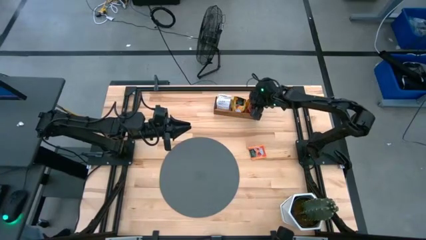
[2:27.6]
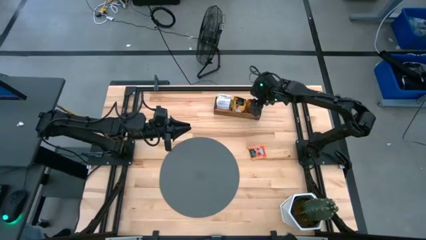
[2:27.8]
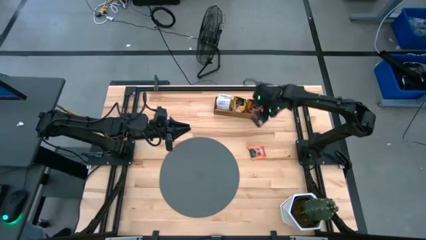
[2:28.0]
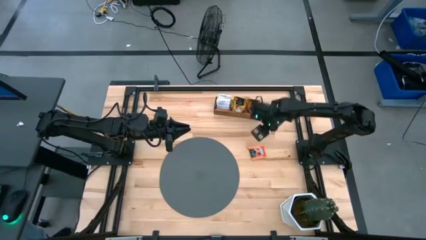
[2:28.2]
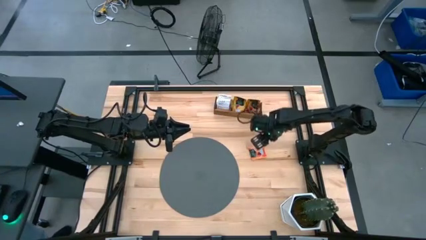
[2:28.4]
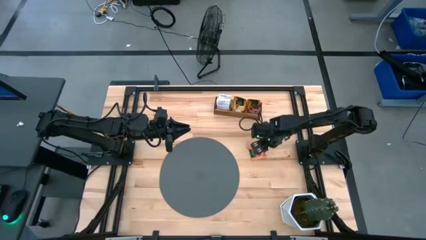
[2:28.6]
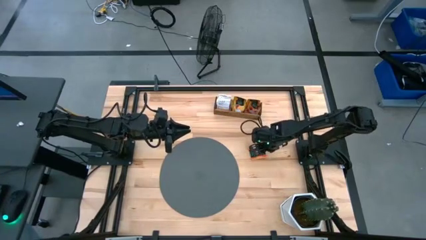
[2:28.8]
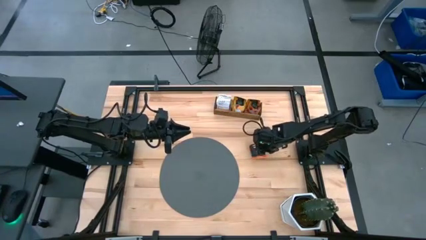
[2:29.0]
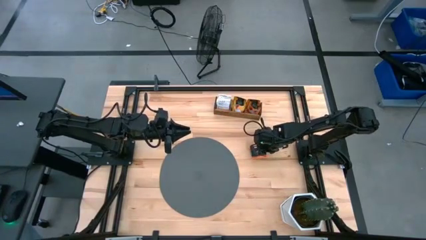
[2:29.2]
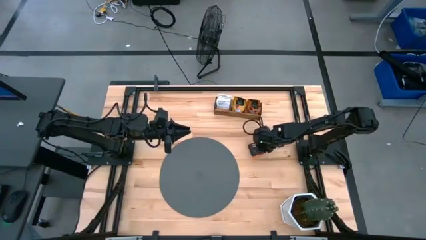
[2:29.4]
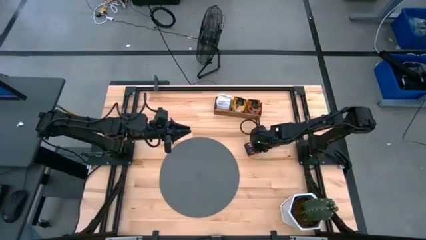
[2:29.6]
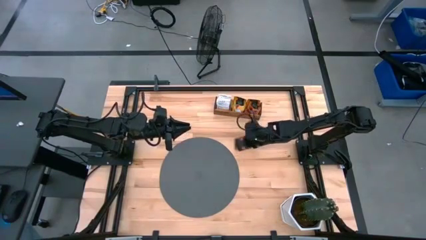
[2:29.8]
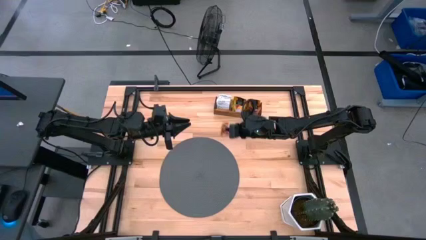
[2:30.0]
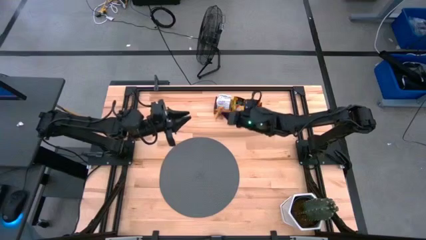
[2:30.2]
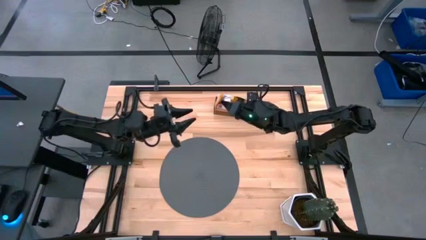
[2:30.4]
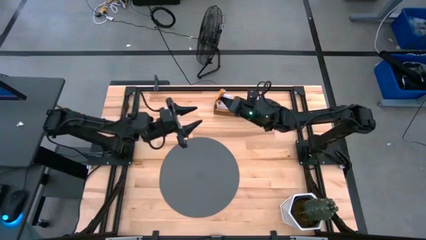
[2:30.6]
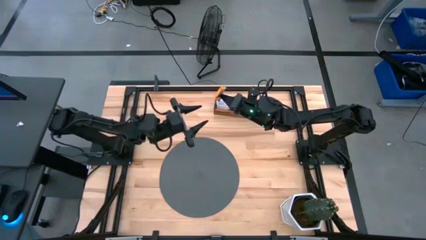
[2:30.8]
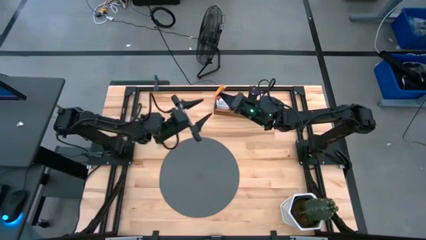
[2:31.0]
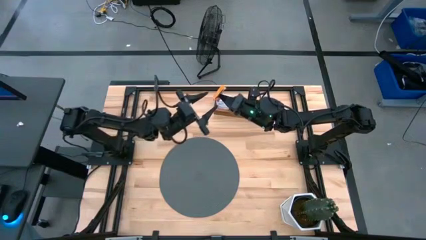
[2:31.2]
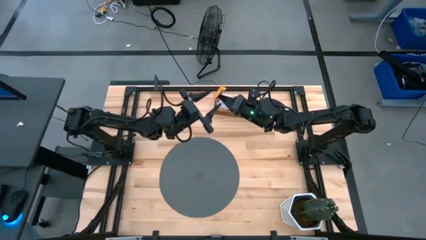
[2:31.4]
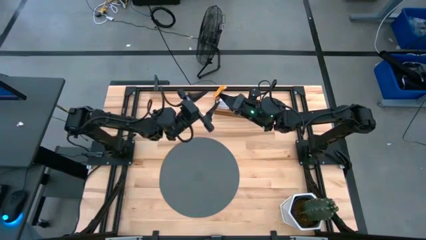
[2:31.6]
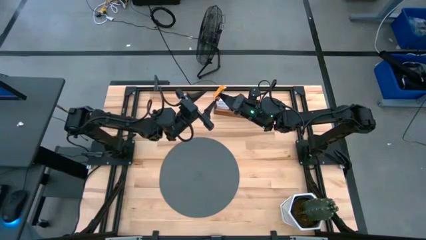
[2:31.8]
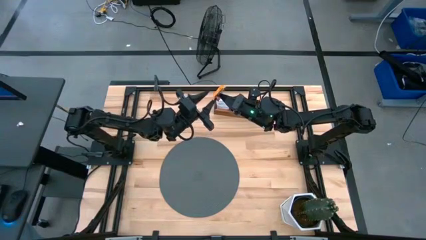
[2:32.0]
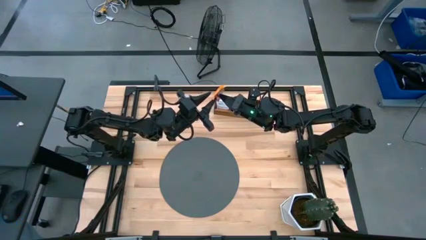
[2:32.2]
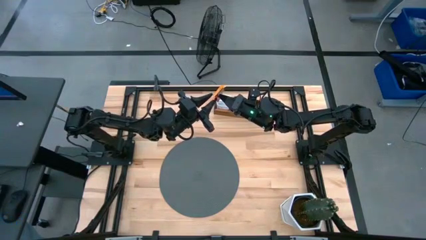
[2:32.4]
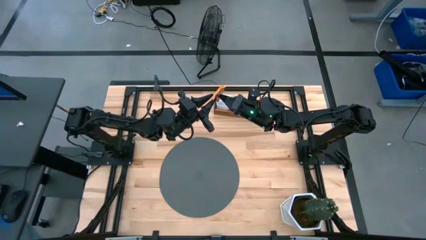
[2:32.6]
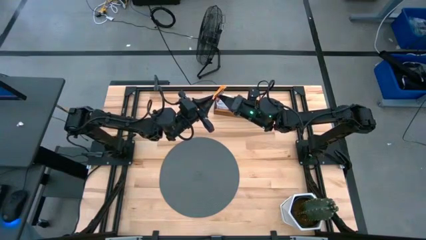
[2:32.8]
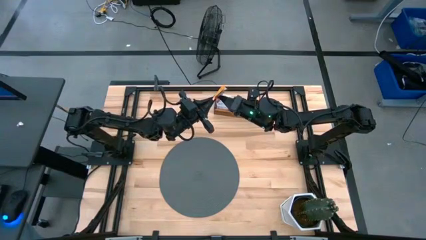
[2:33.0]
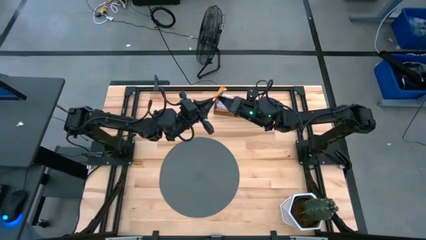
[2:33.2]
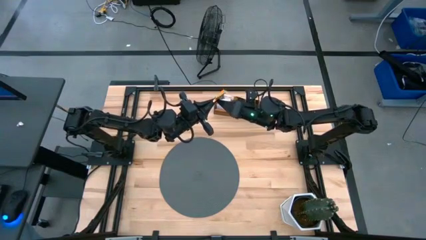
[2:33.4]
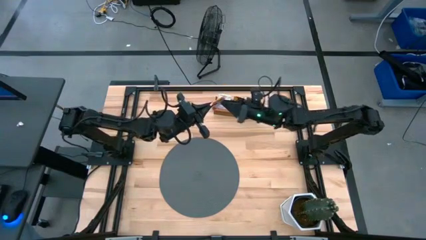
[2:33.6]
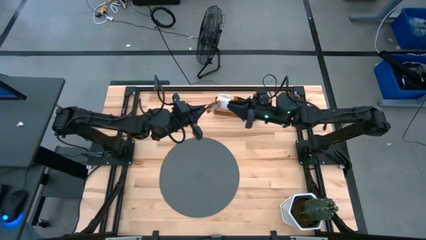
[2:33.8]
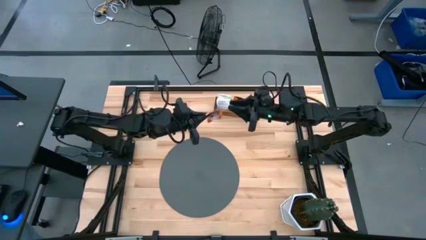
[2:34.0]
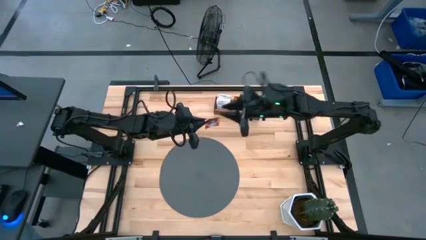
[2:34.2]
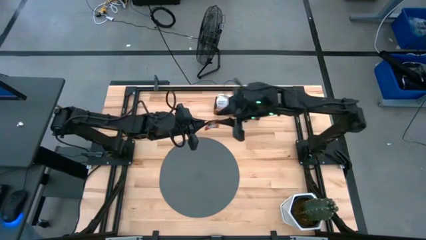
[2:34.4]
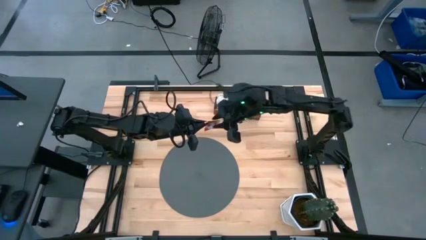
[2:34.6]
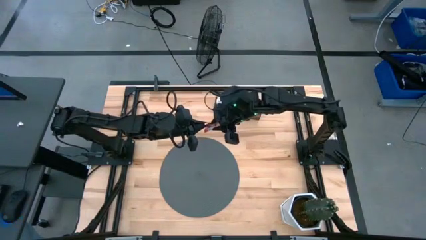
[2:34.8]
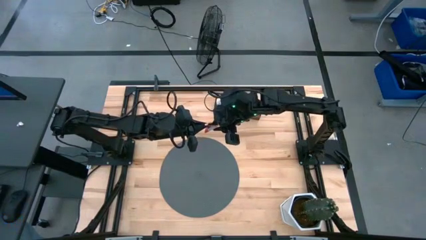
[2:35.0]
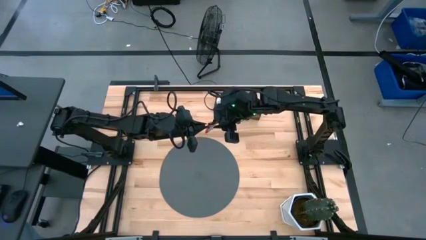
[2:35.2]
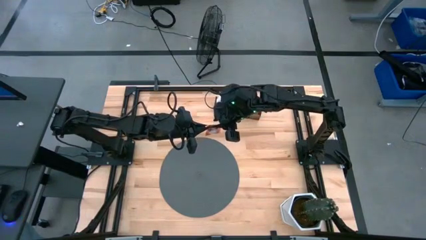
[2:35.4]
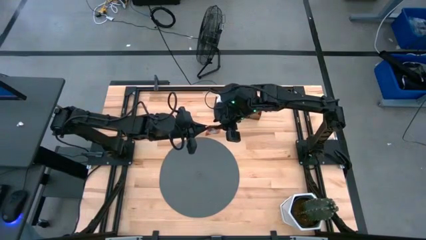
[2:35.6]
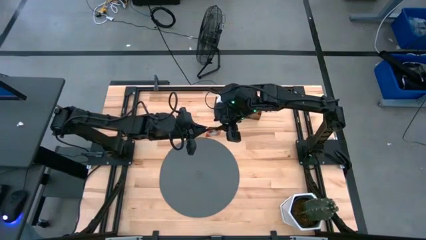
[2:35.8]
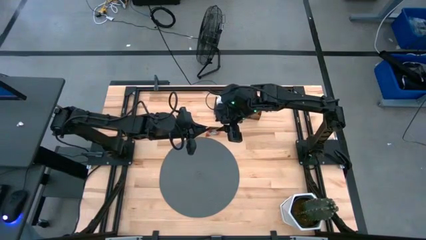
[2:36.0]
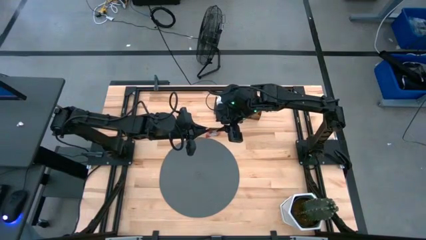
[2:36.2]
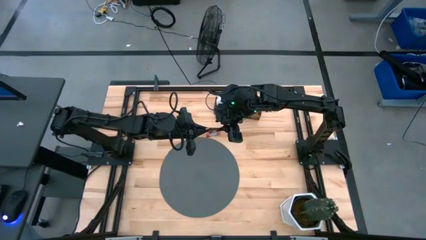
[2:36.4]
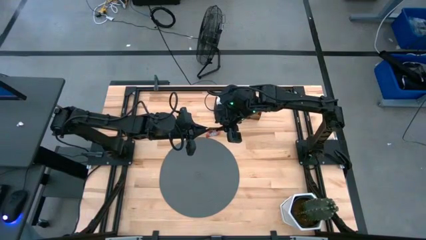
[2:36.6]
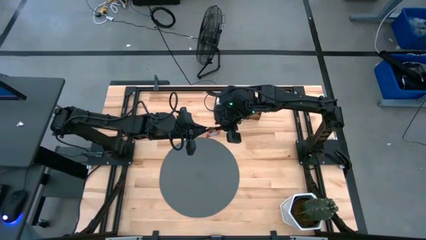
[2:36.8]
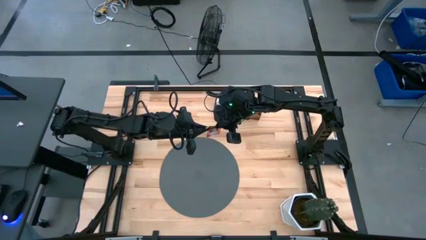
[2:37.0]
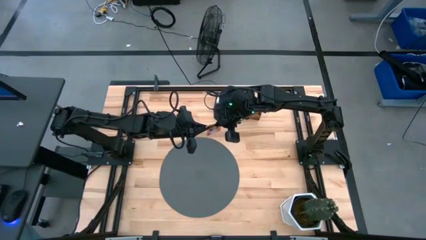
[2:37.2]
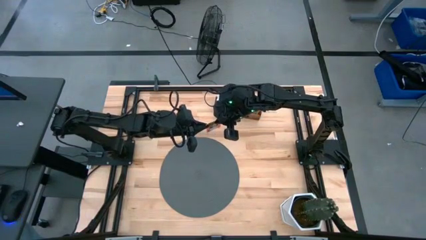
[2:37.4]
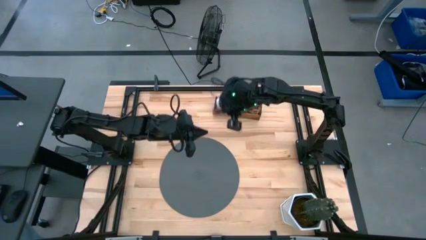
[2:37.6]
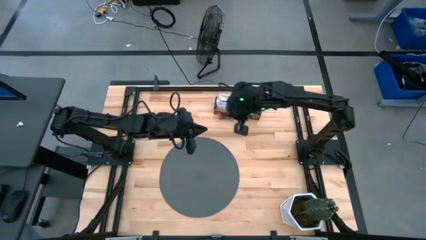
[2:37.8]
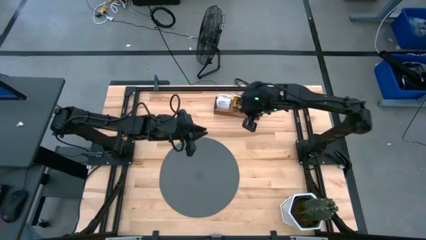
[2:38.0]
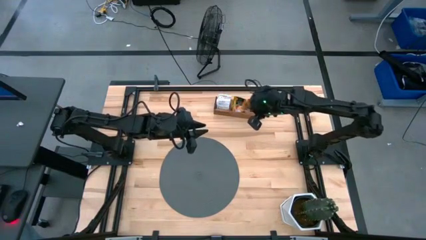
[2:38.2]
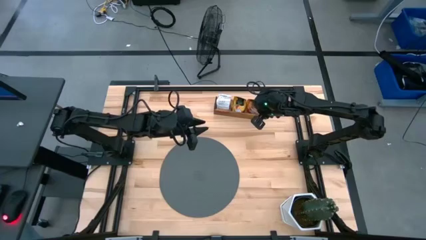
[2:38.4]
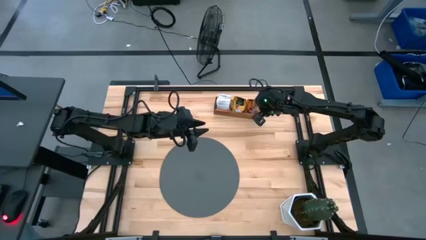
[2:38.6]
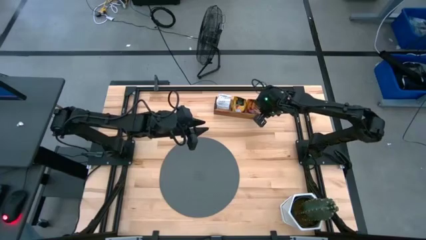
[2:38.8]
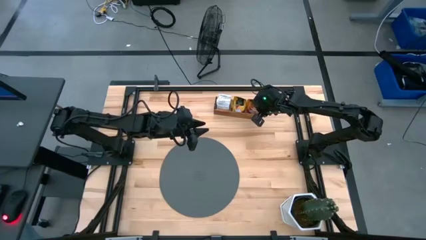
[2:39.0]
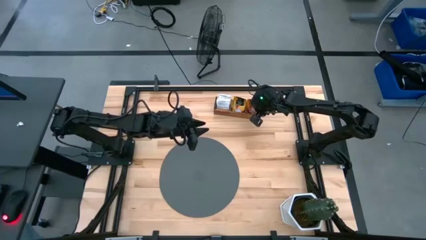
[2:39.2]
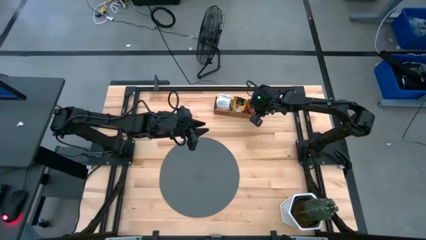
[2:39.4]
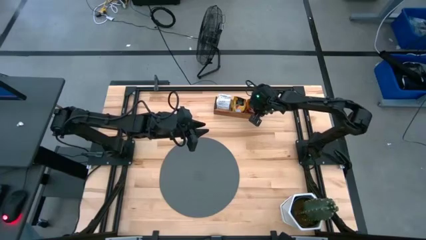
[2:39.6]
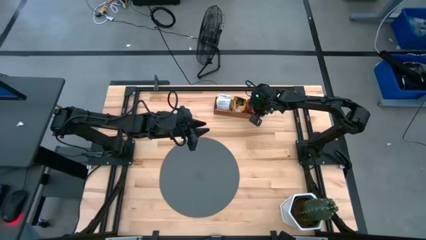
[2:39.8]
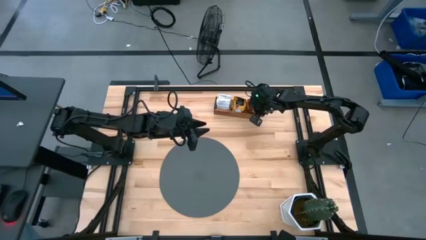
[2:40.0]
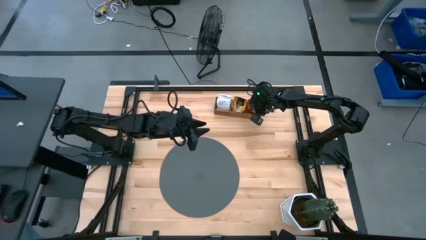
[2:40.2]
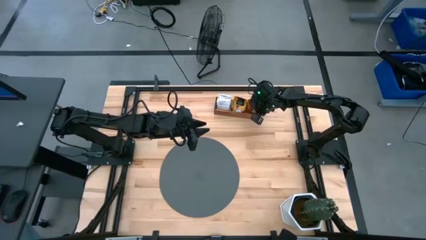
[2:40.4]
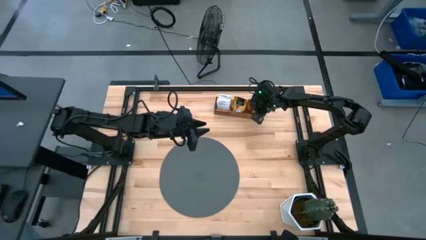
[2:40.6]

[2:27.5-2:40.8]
Task: Pick & Place Tea
Put the orange tea bag into the right section of the wooden organizer

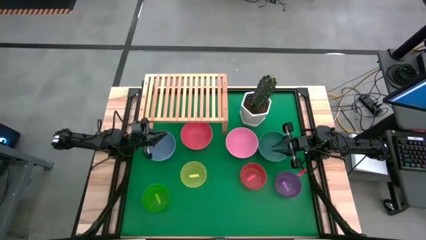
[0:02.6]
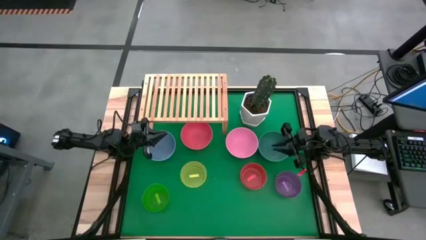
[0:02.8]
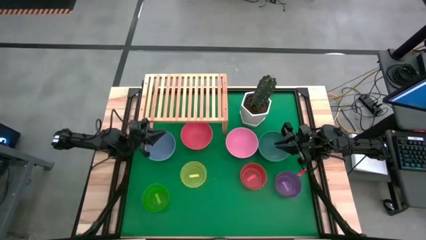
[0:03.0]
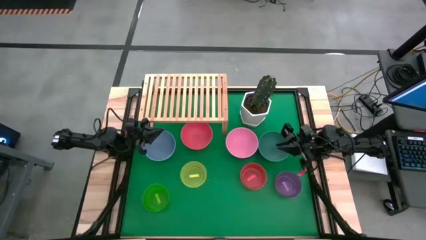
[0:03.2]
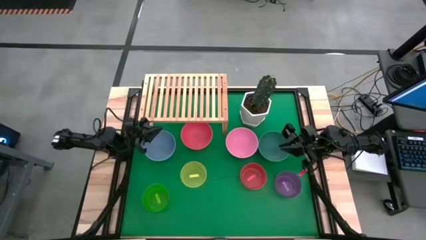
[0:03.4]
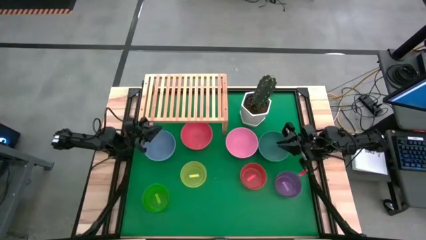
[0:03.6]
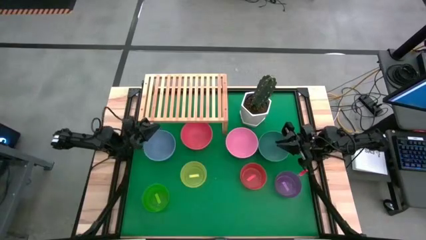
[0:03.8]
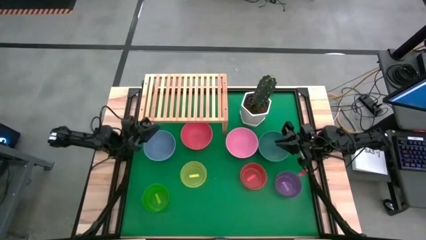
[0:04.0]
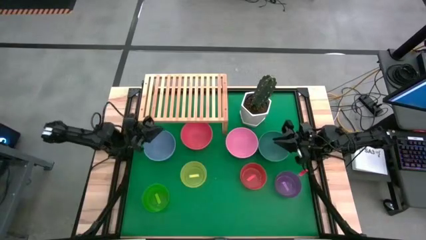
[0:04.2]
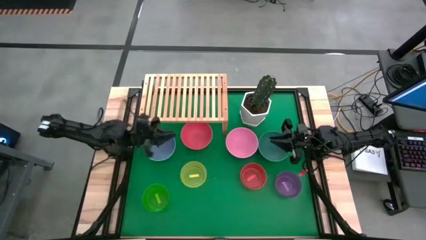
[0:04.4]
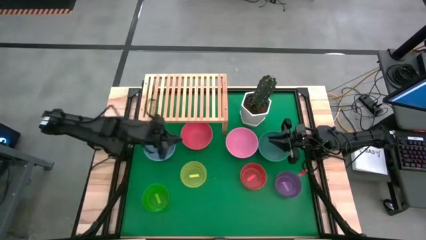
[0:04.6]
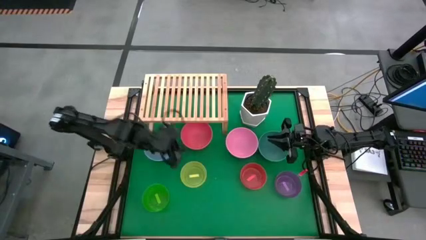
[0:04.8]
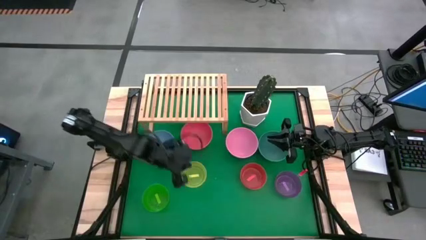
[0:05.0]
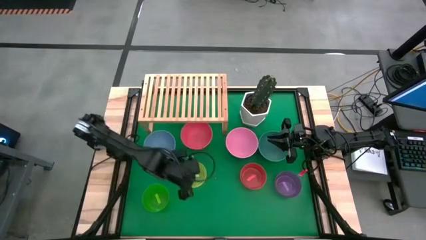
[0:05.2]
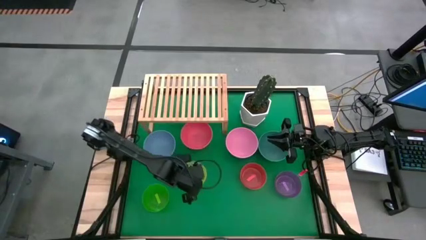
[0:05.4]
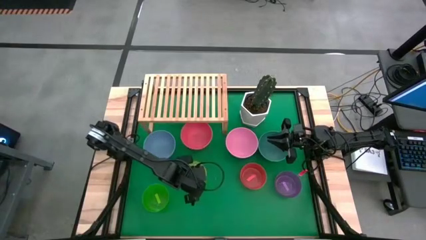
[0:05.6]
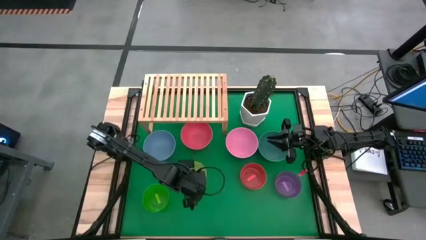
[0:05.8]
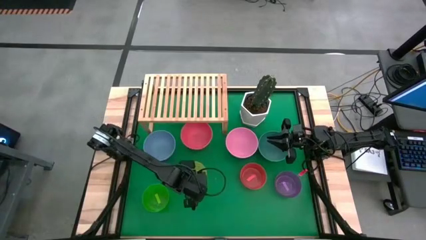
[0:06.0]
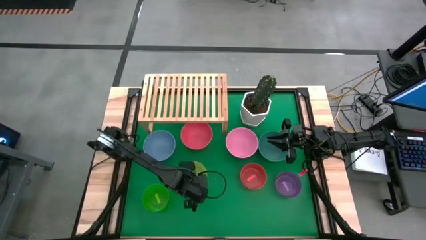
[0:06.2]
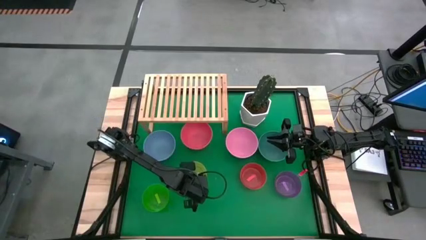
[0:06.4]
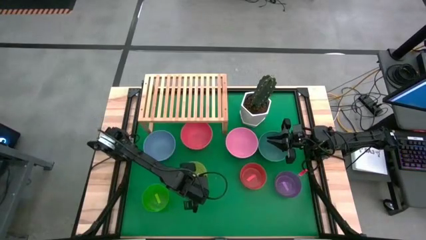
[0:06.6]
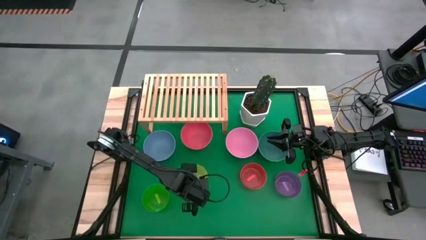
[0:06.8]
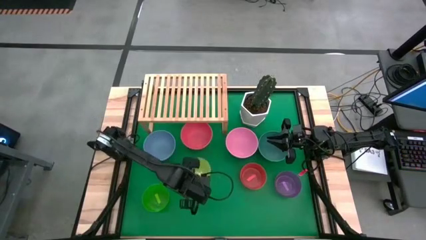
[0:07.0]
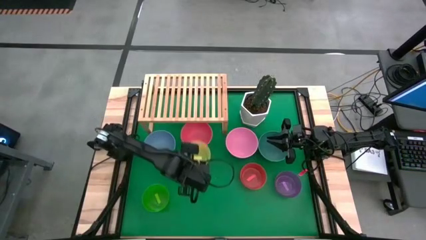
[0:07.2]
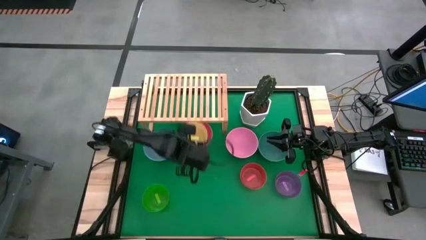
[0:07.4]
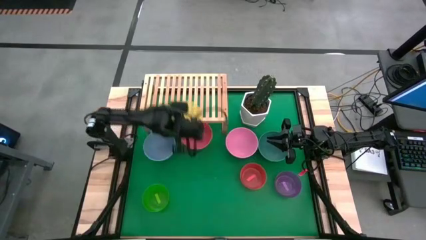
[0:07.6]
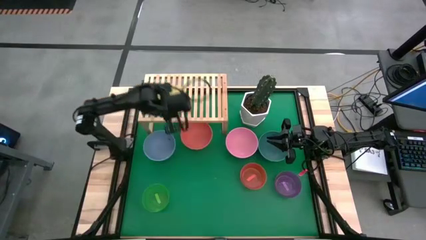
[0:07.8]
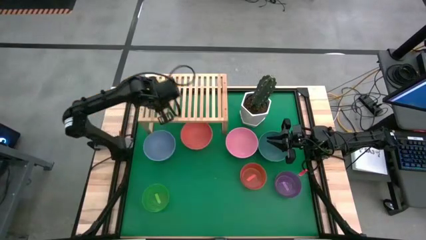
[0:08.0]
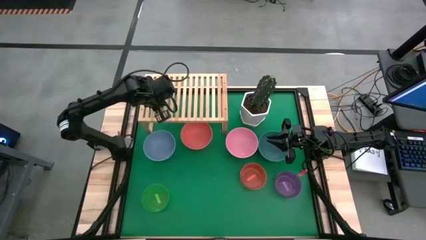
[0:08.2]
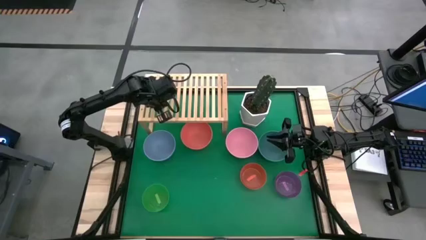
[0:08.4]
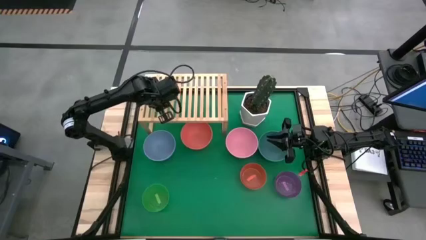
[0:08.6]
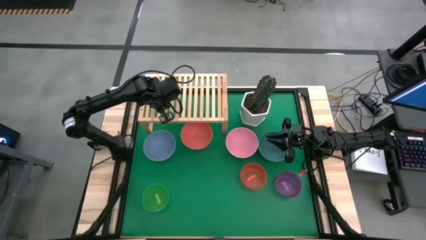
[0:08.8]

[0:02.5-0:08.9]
Task: Place and stack bowls onto a shelf
Put the yellow transparent bowl on the shelf
